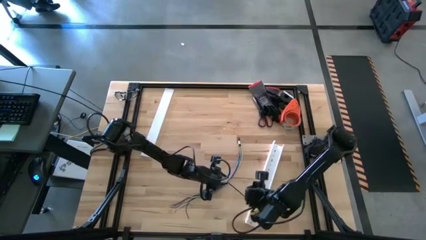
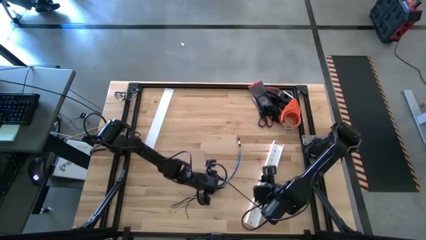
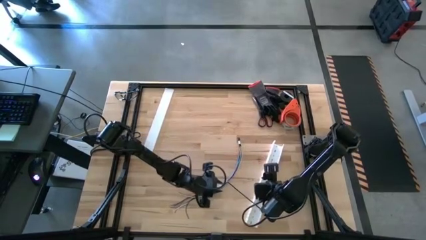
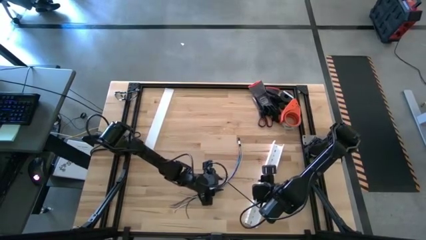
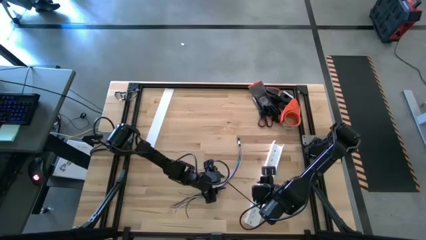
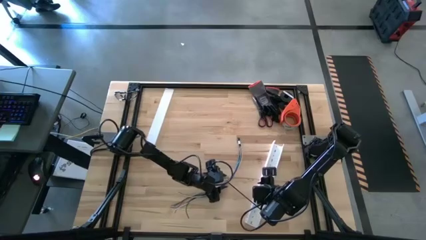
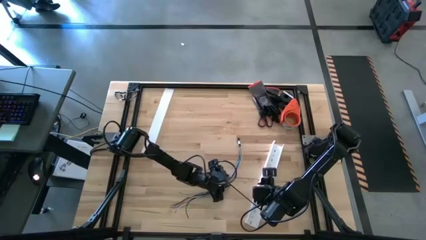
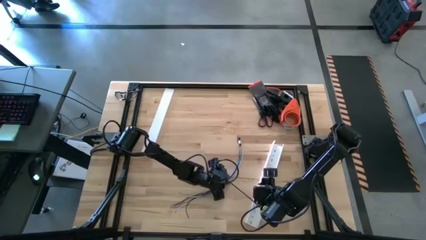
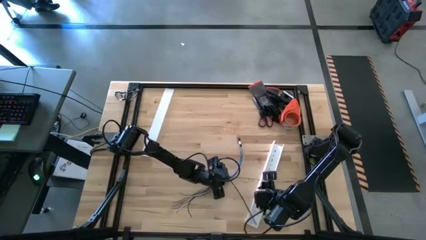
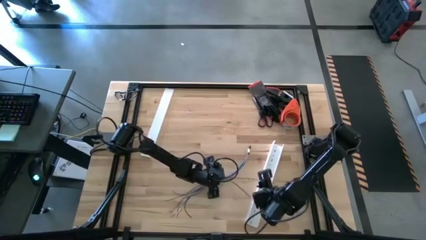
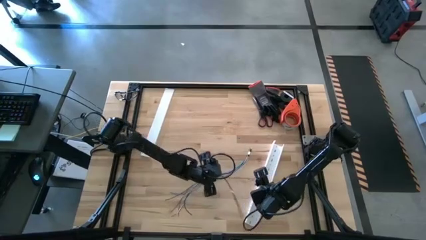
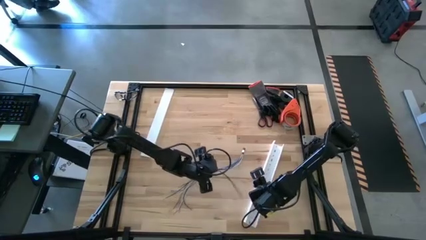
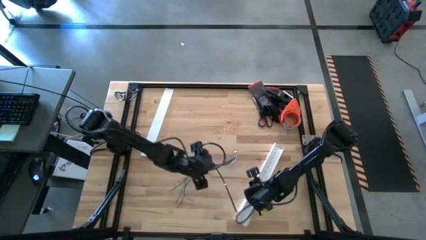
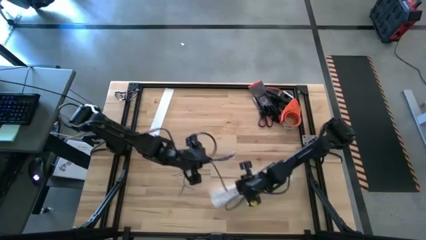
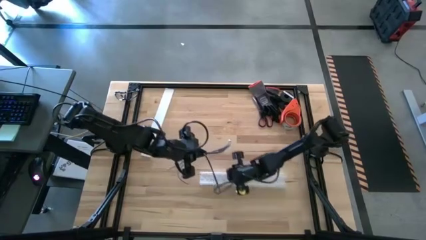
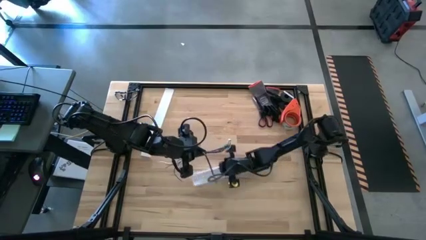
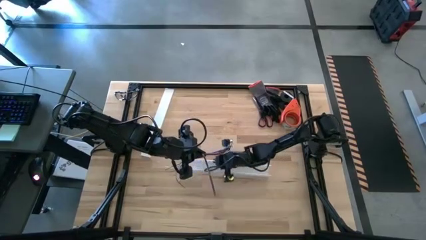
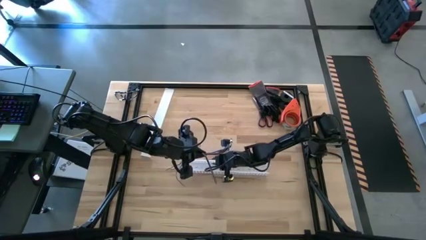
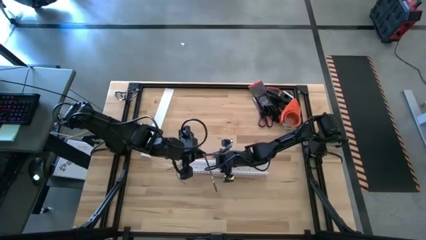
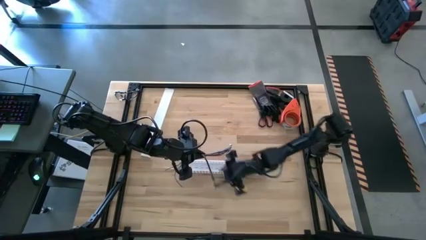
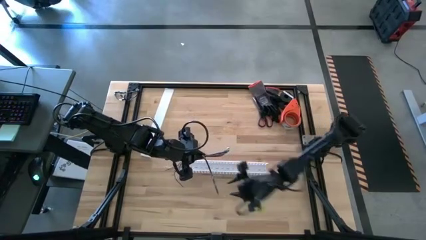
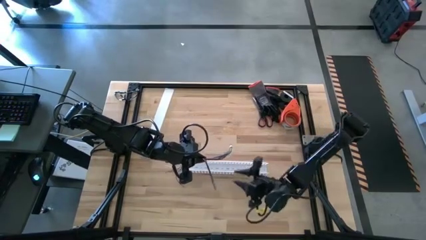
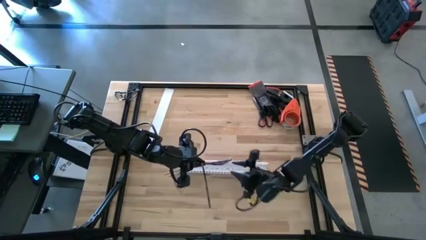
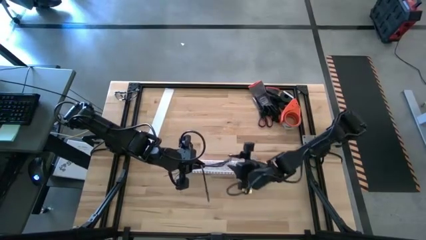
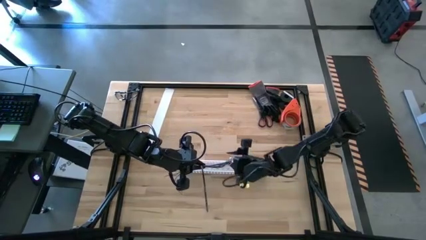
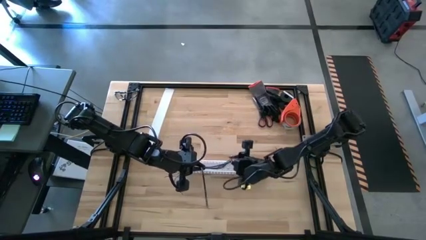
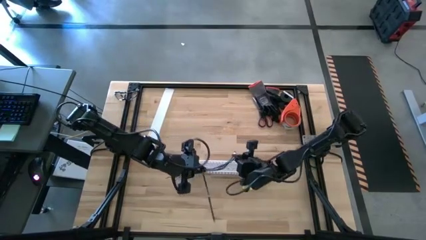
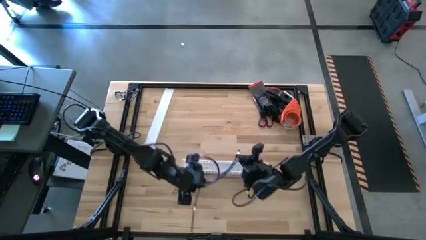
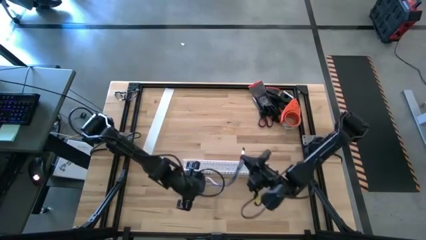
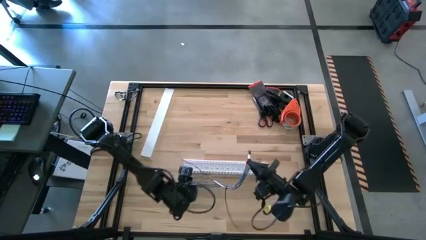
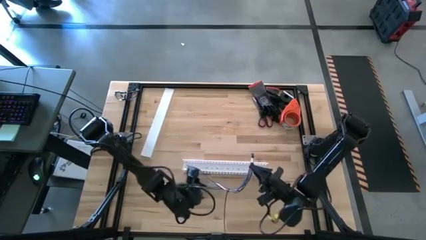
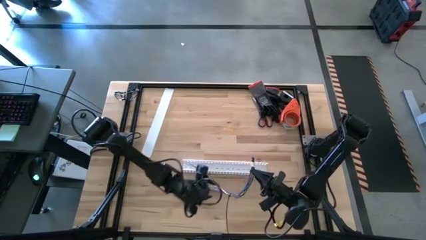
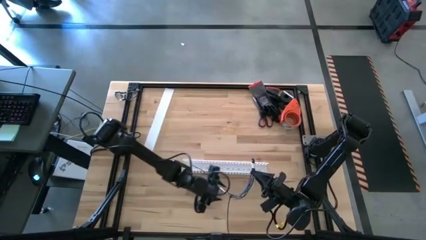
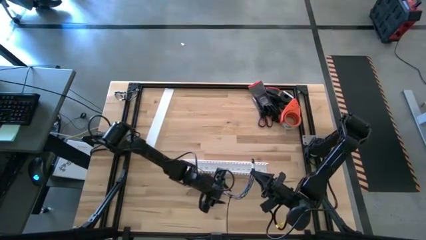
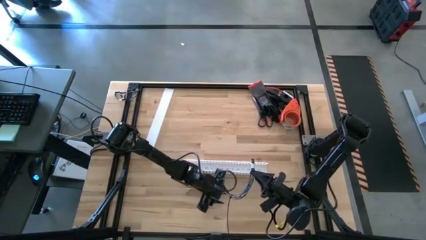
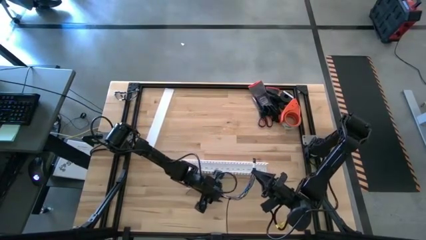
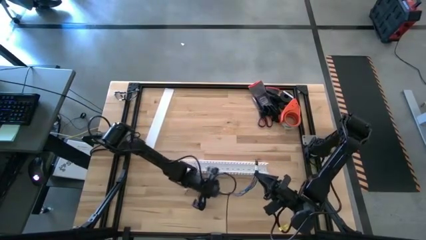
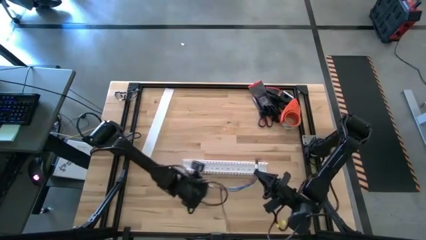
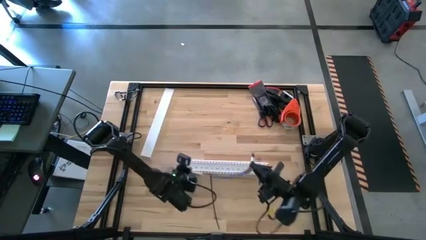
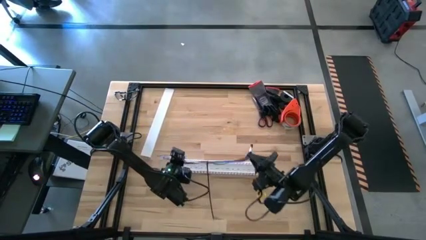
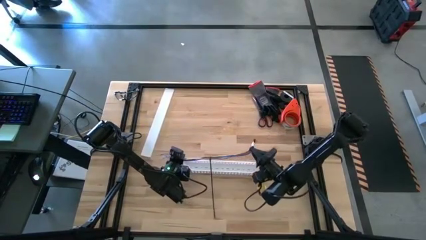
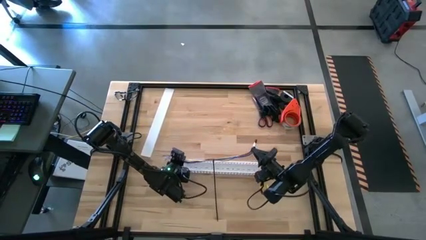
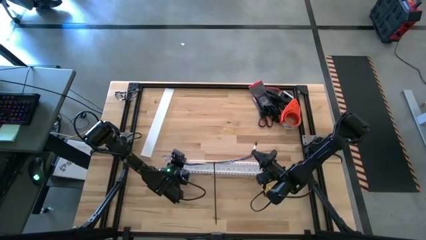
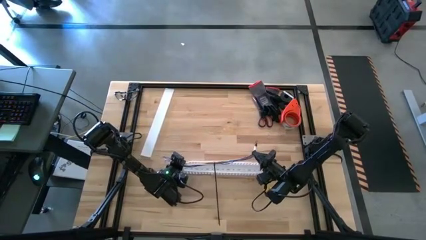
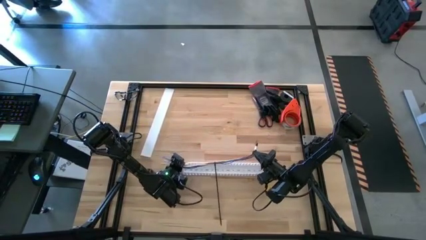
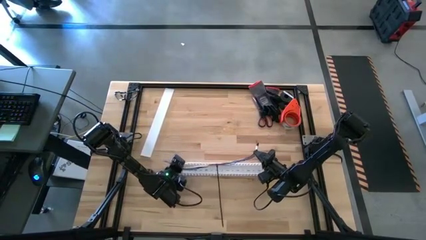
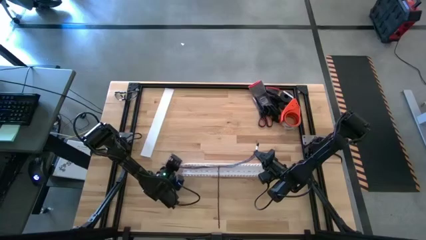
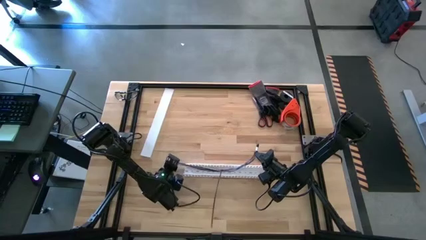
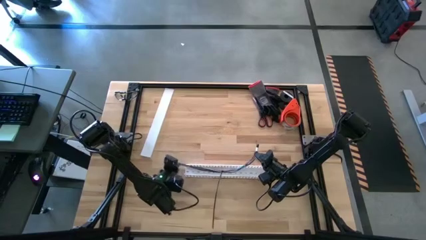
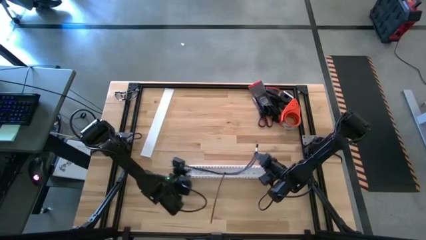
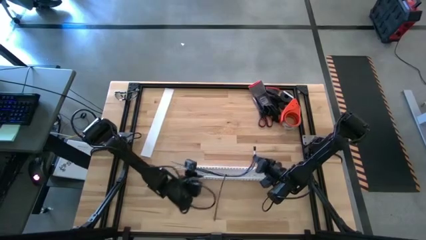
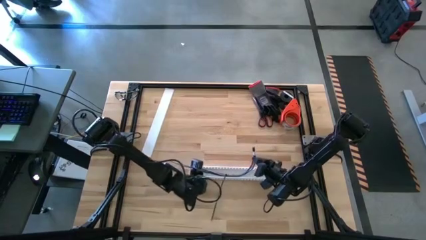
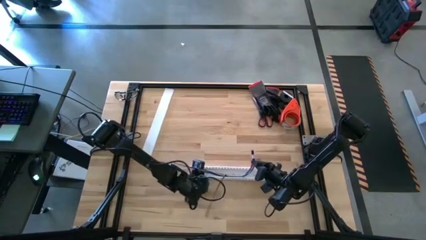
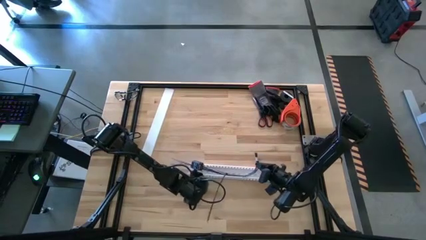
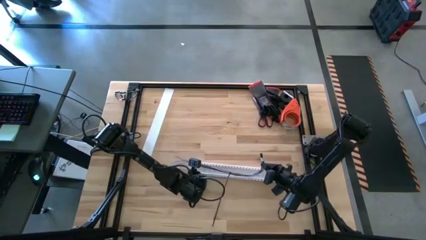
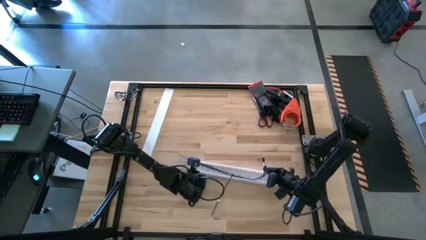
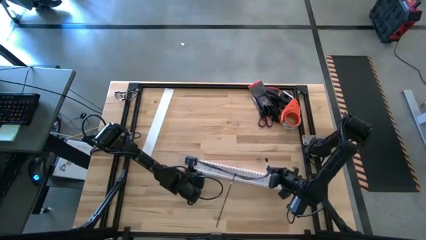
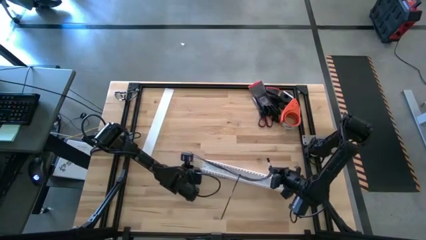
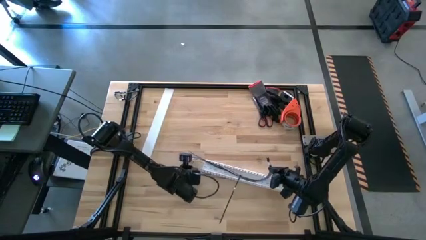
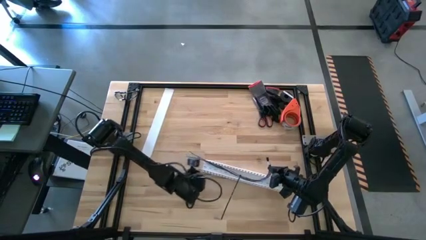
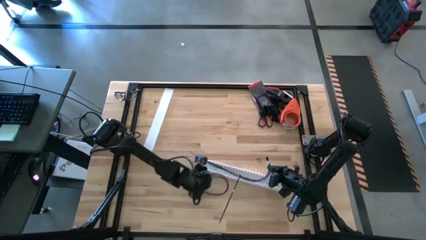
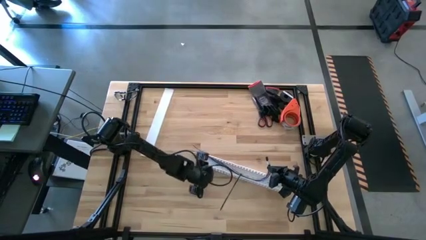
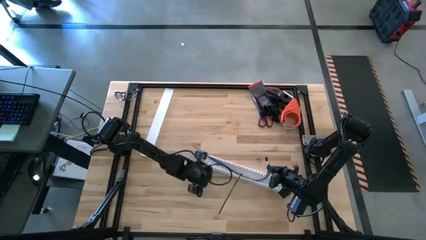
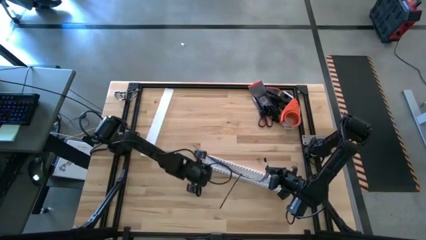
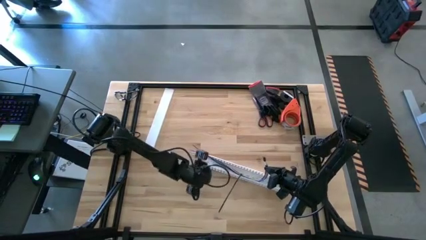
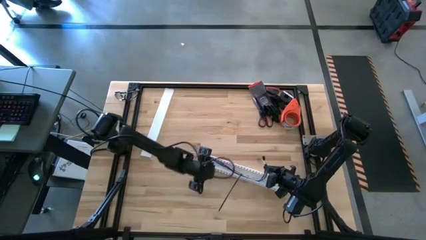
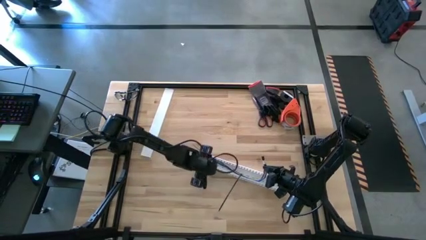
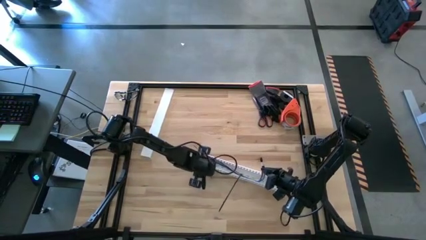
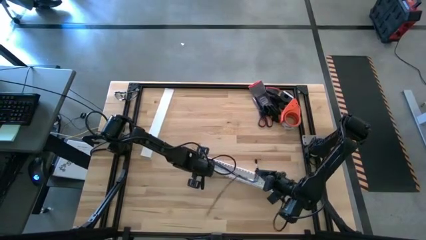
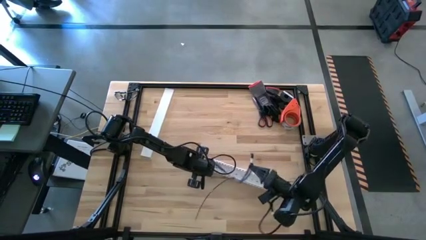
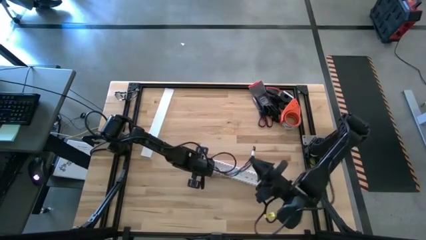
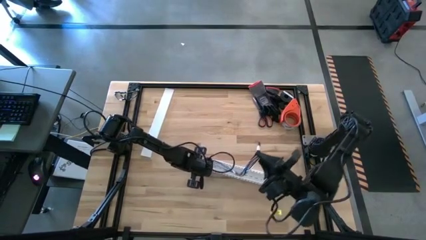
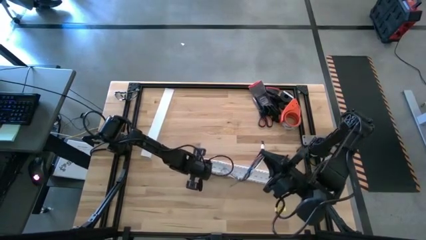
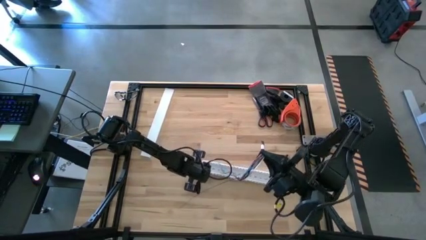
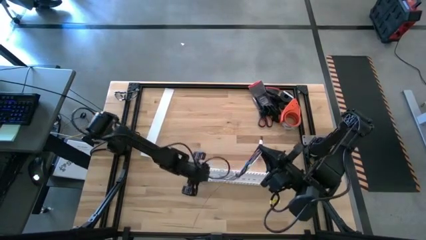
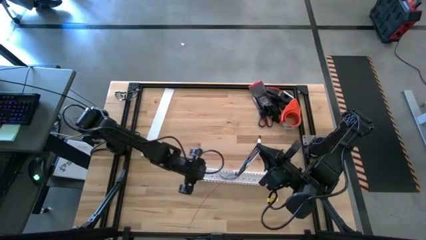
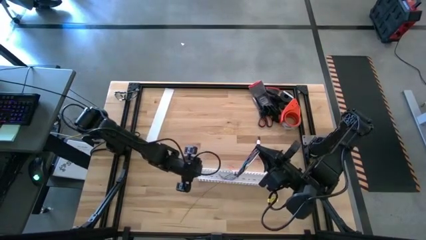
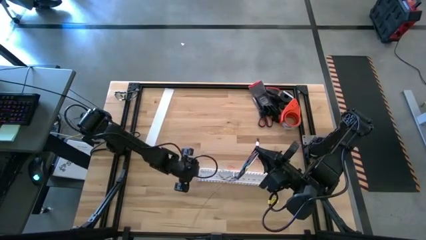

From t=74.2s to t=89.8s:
Task: Ziptie cables
Put the colored ziptied cable into the white cable duct
